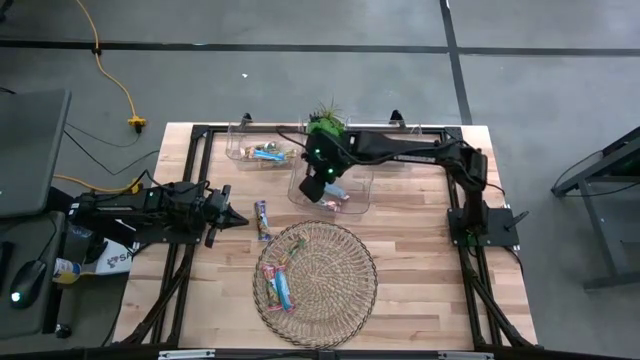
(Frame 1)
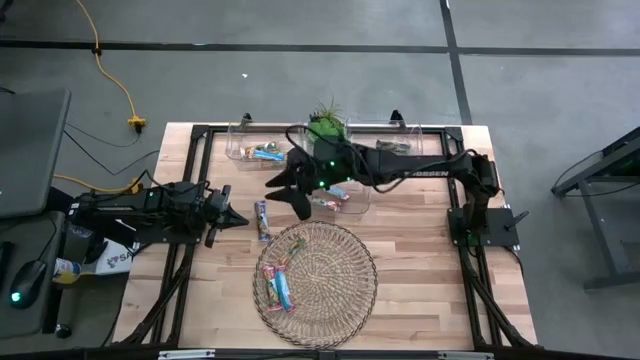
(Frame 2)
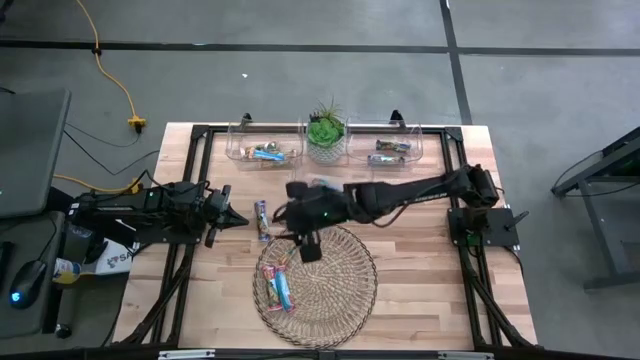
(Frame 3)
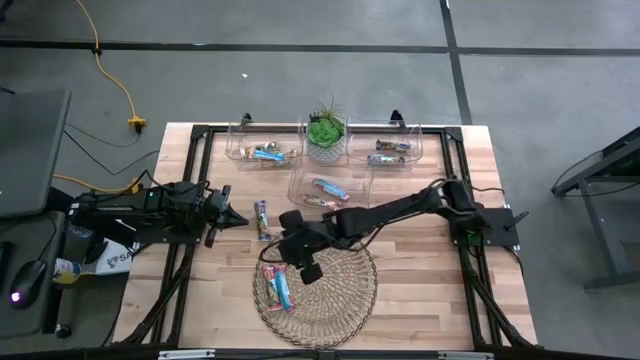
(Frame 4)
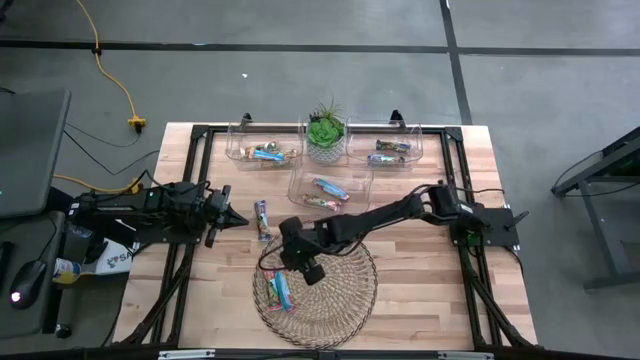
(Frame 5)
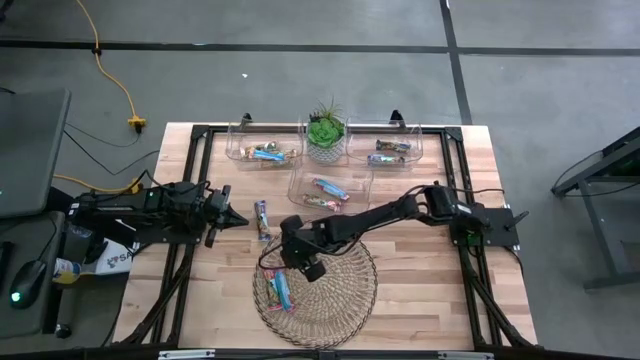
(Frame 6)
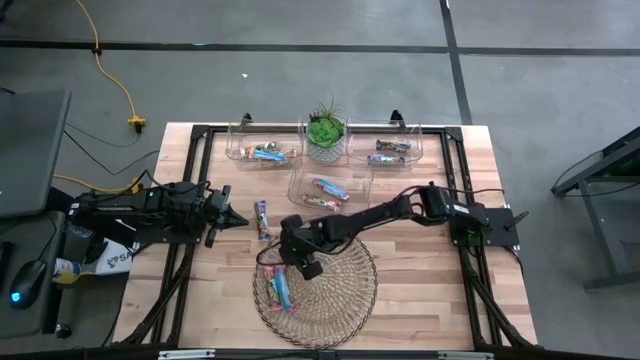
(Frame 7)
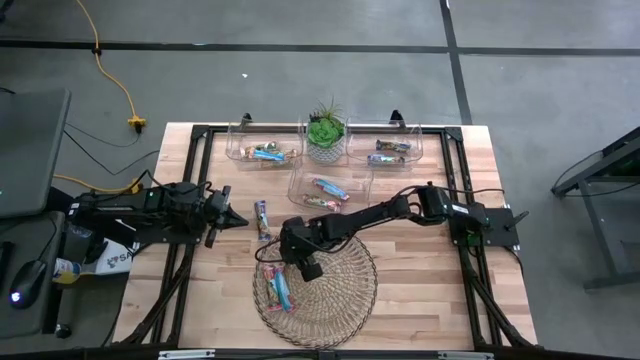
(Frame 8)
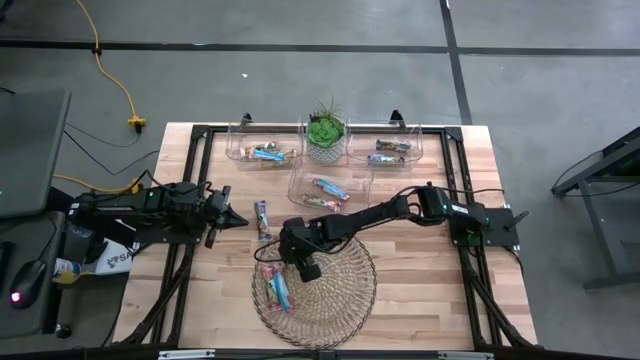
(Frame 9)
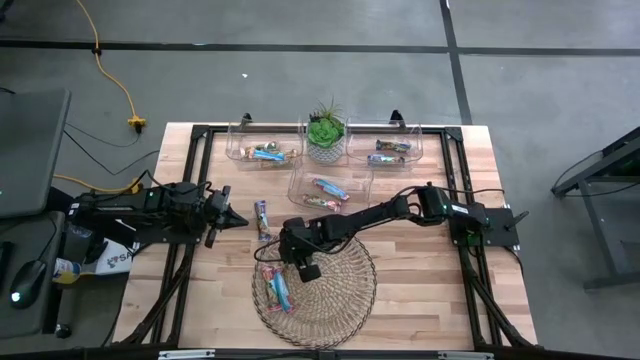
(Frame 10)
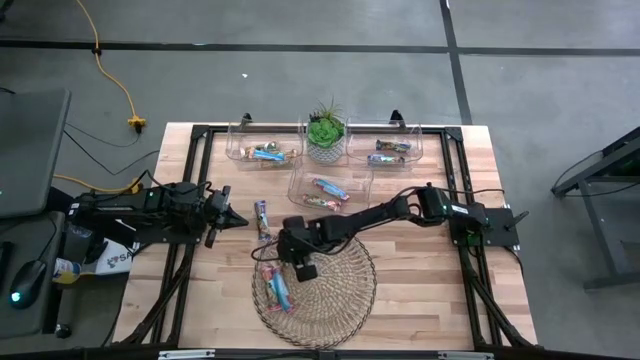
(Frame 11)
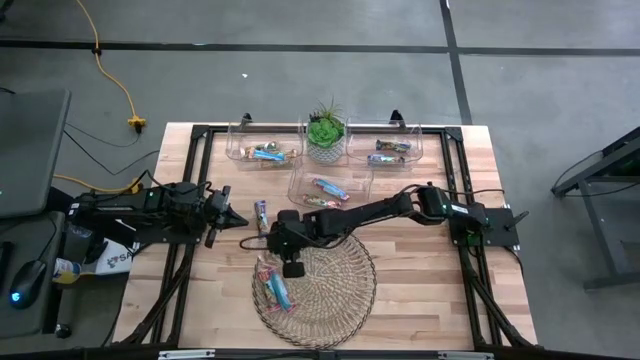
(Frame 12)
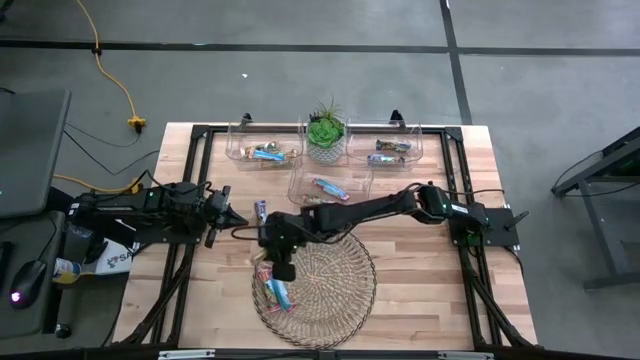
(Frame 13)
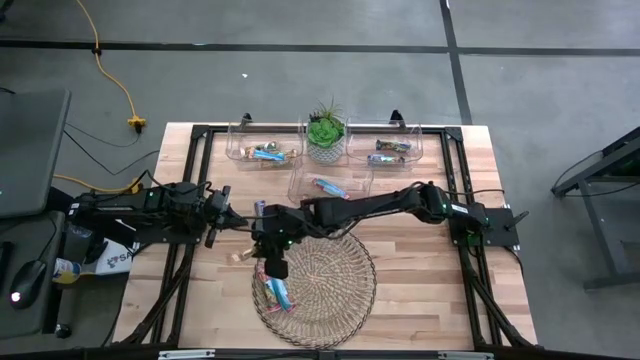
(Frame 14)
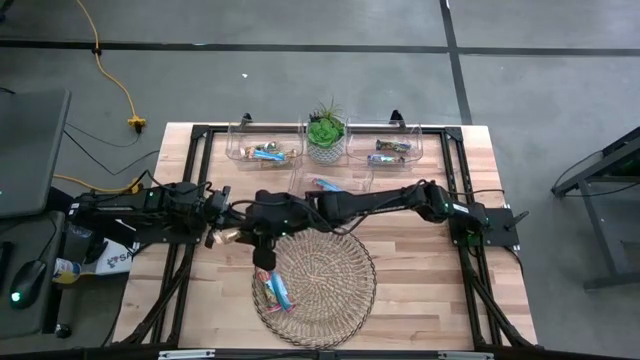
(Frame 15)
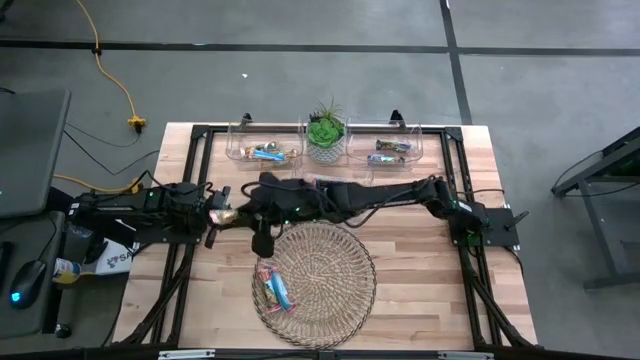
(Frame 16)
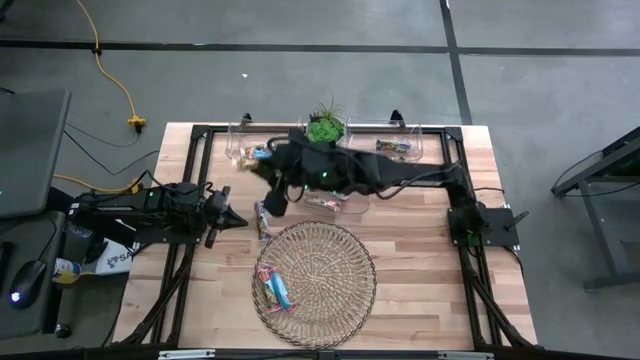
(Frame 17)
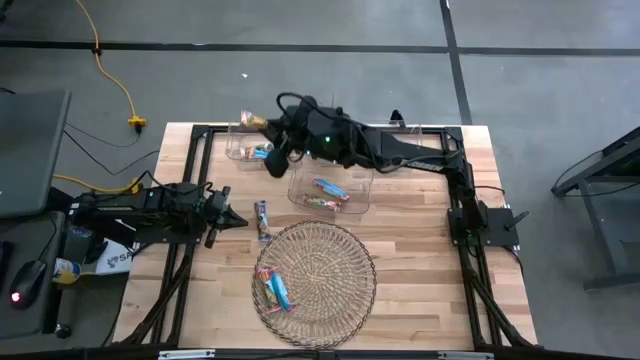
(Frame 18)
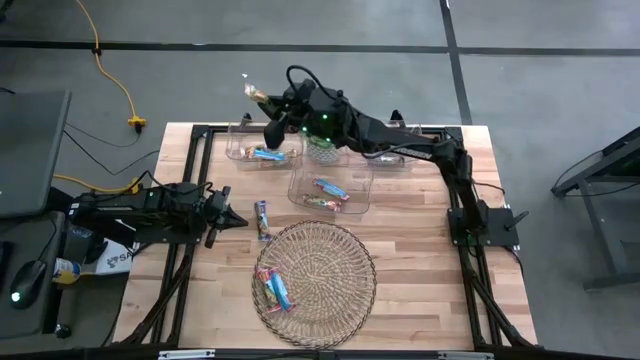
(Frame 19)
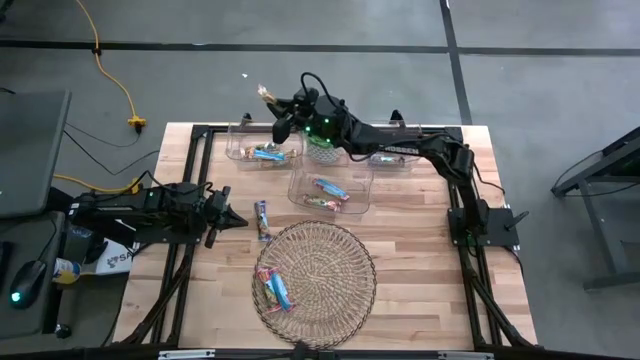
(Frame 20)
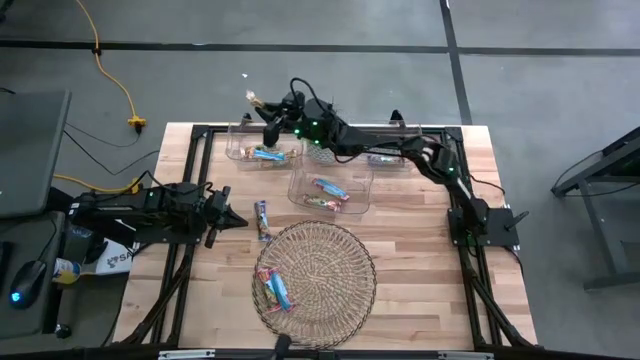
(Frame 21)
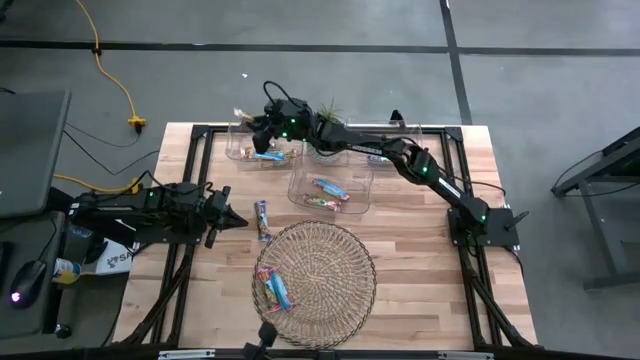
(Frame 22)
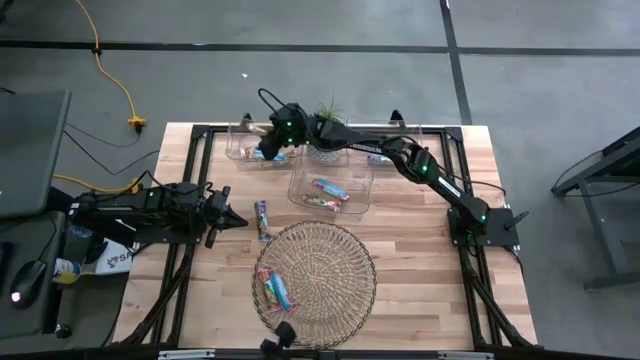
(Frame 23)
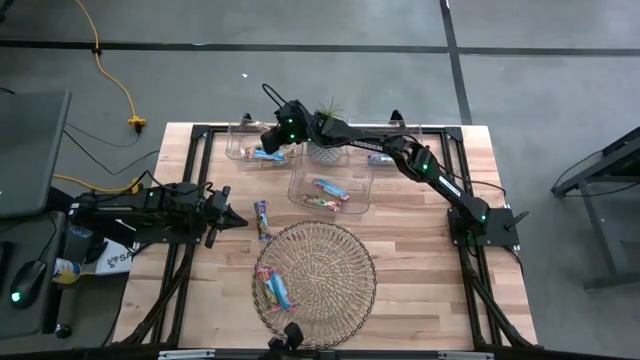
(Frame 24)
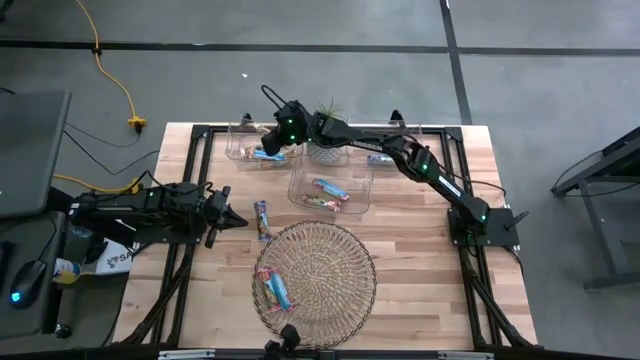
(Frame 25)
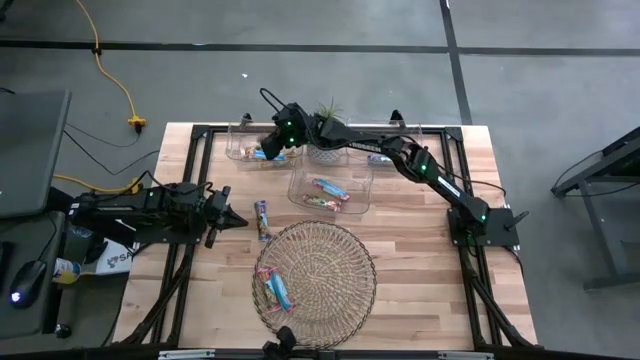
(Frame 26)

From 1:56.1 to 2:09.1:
Task: Pick and place Granola Bars by type
Put the yellow granola bar into the top left transparent bin

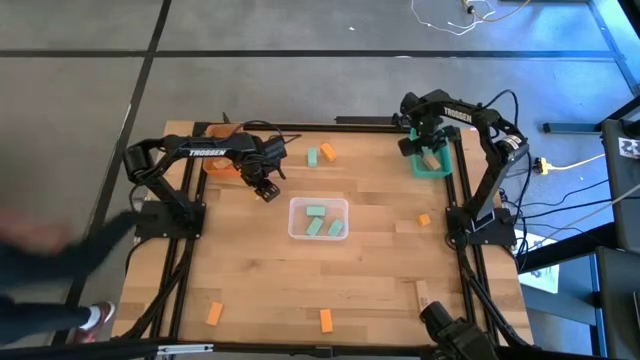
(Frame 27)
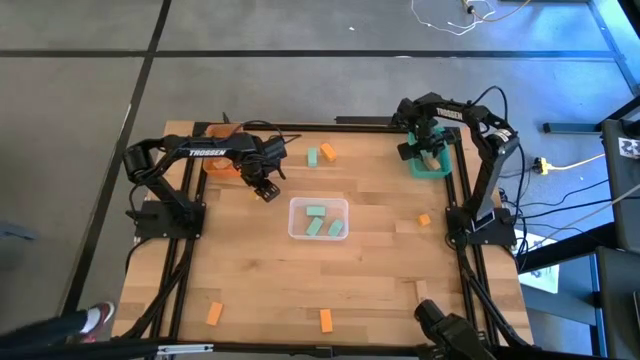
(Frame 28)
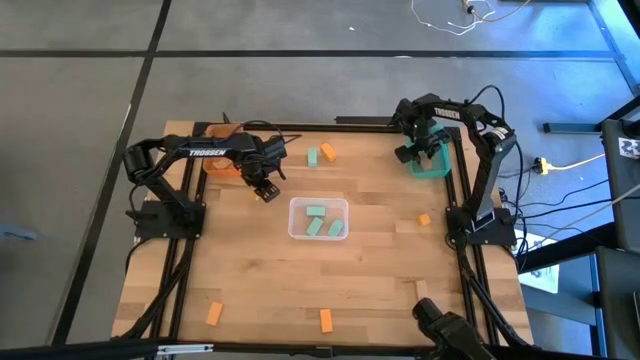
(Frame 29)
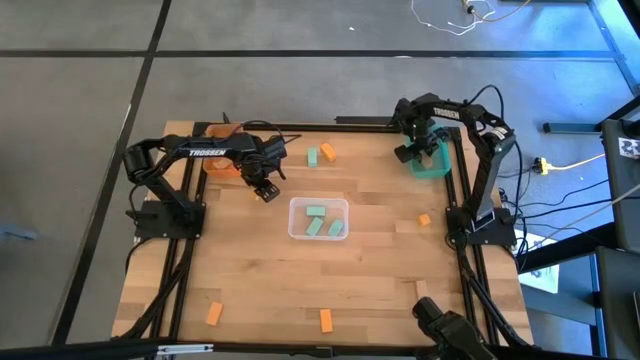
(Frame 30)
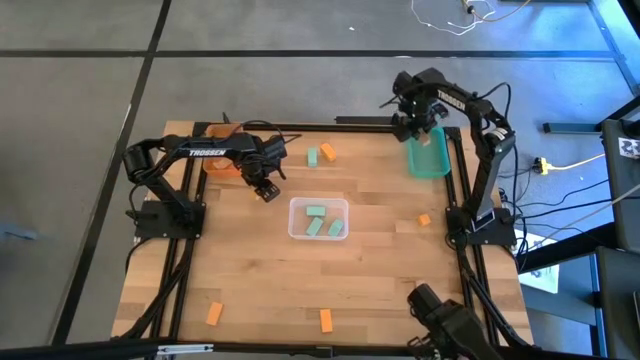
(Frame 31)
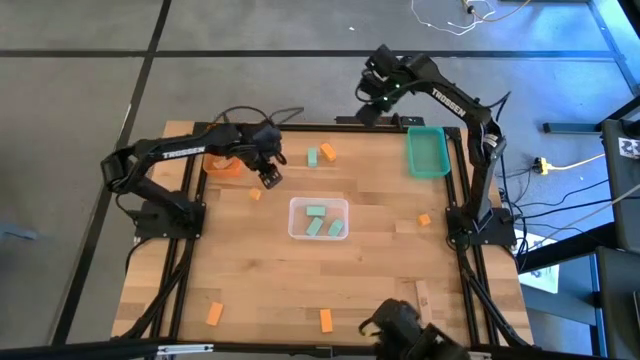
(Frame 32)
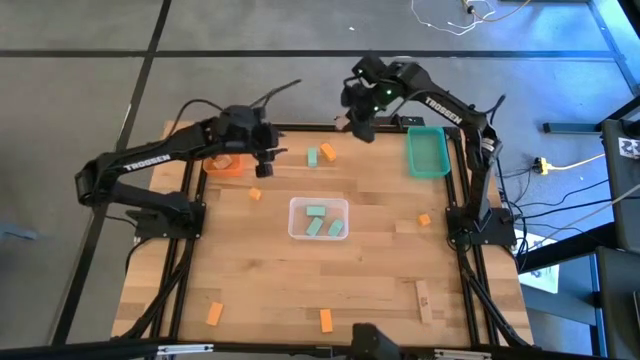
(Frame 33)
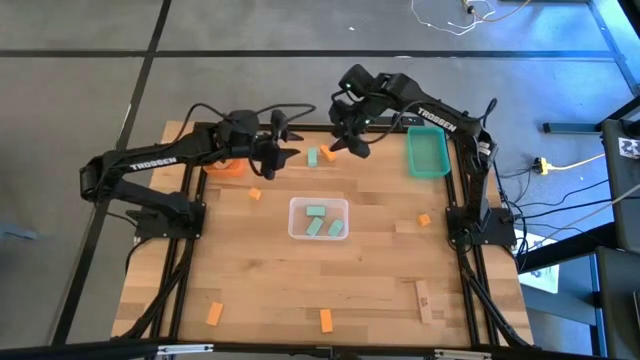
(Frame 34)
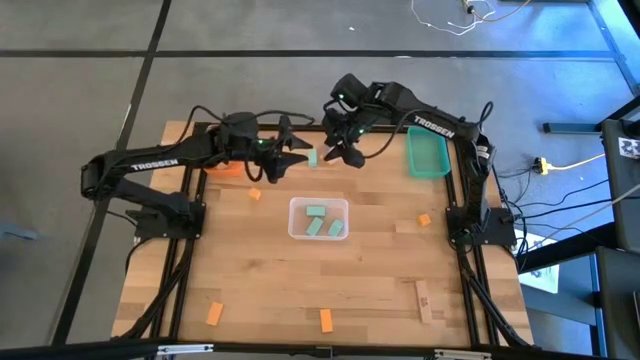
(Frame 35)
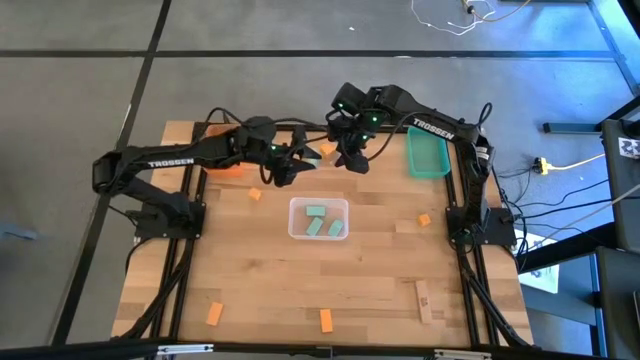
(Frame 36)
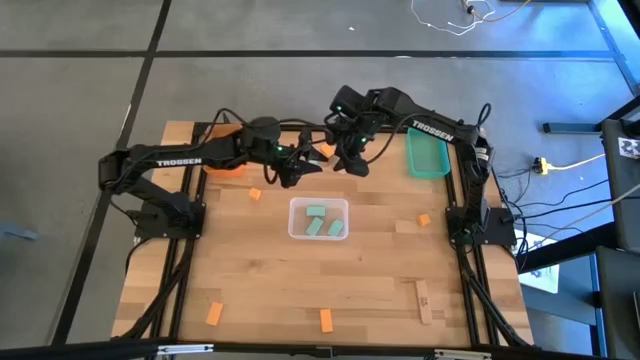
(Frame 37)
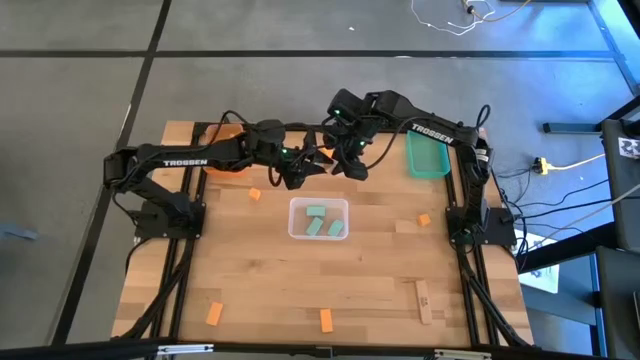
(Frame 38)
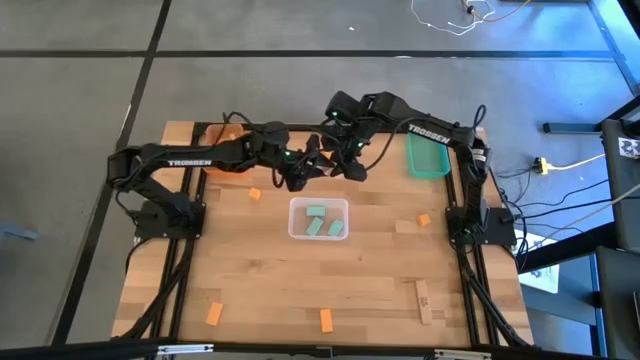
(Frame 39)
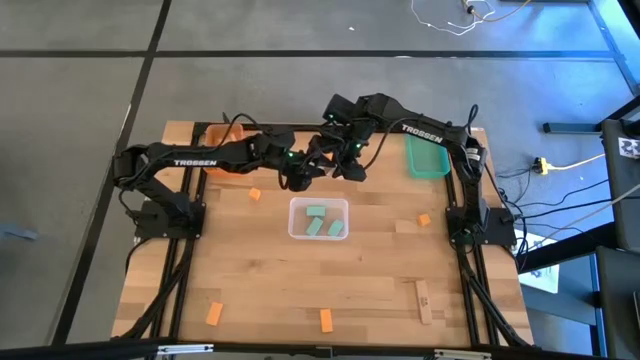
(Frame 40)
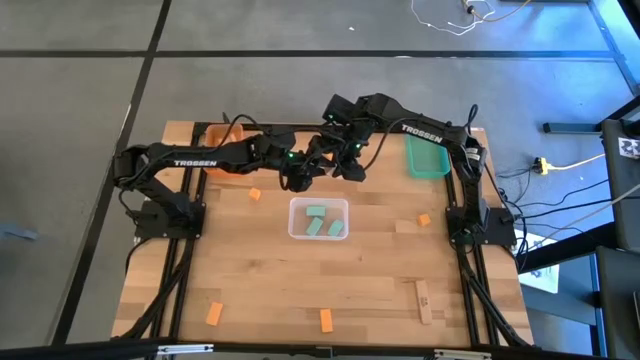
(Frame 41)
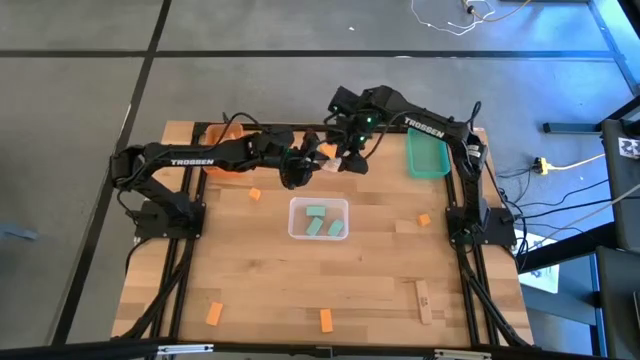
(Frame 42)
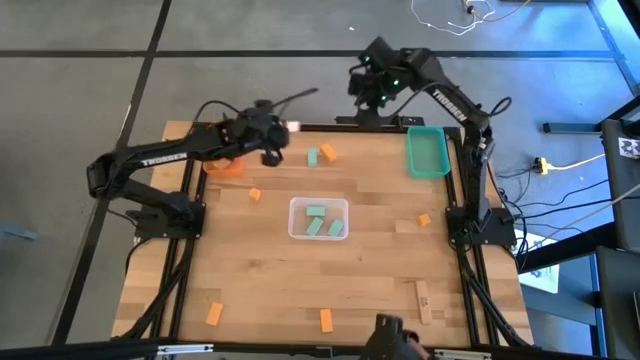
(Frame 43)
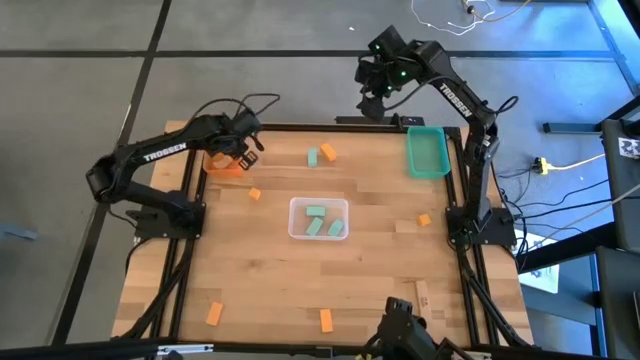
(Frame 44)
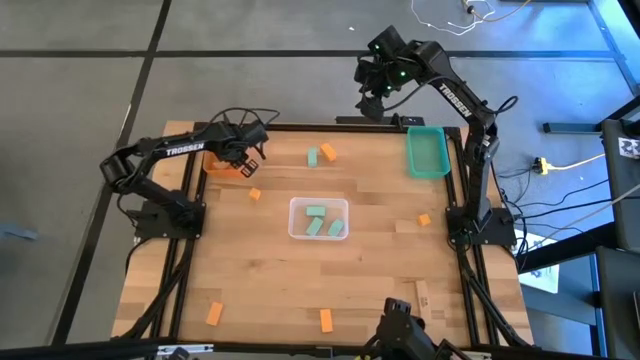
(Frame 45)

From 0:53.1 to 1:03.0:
Task: Sort & place blocks by color
Put the light brown block from the blue bin into the orange bin
